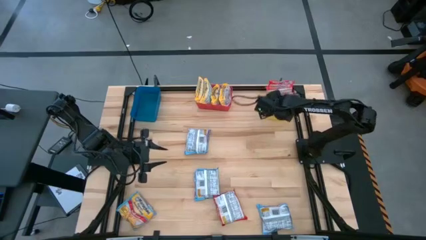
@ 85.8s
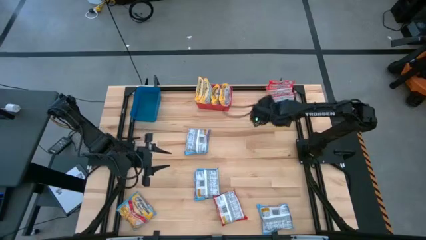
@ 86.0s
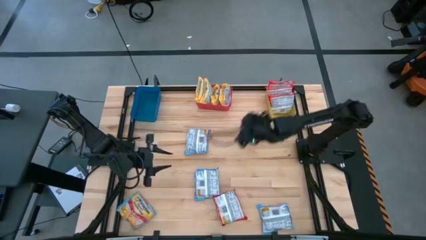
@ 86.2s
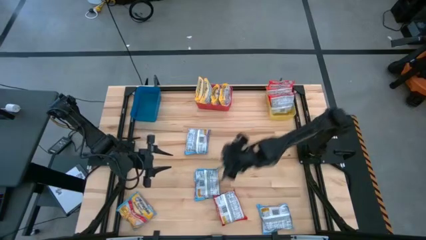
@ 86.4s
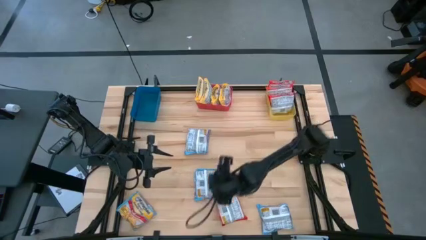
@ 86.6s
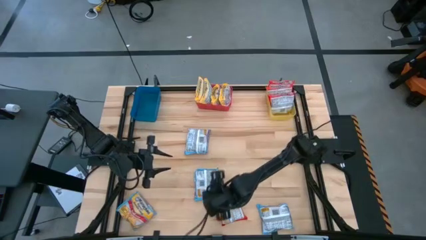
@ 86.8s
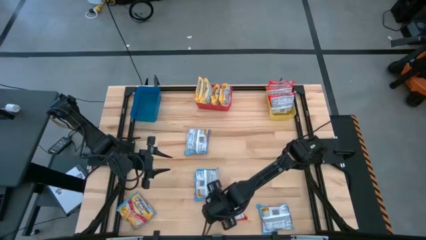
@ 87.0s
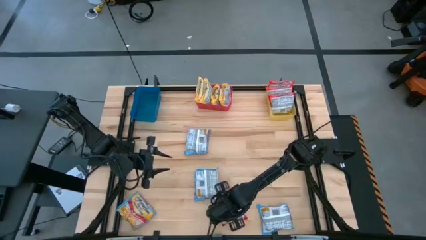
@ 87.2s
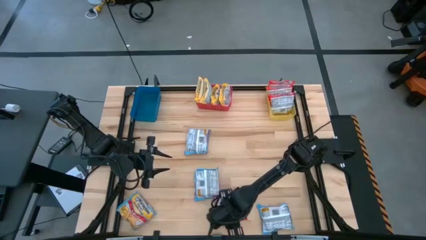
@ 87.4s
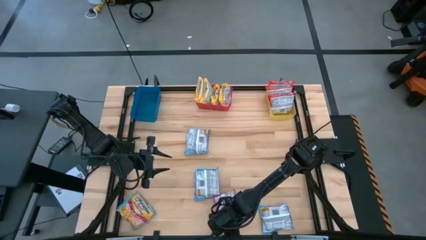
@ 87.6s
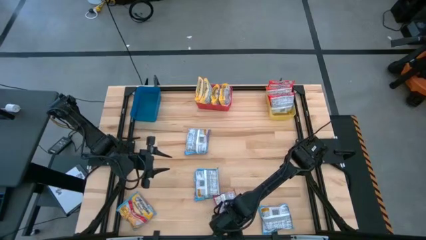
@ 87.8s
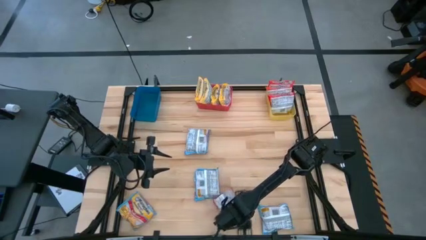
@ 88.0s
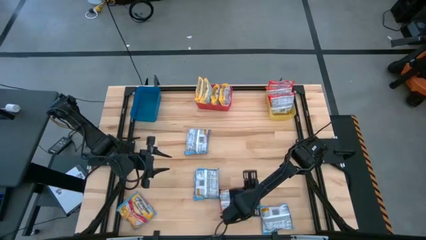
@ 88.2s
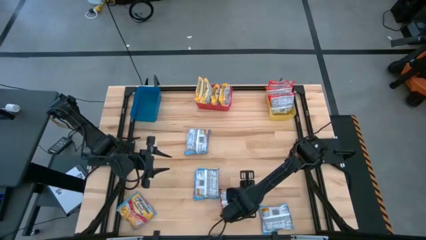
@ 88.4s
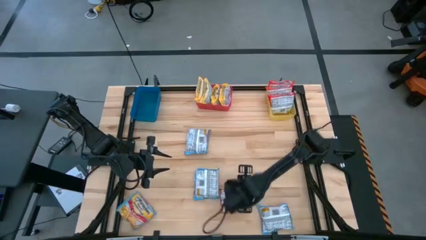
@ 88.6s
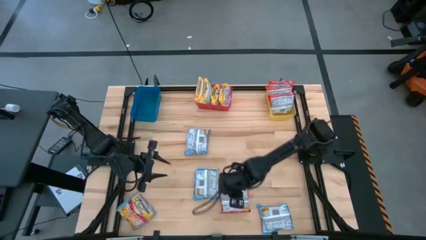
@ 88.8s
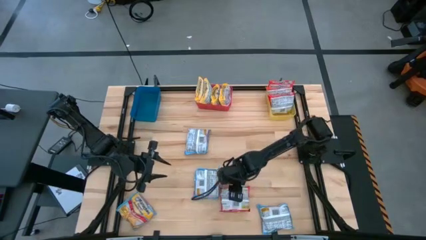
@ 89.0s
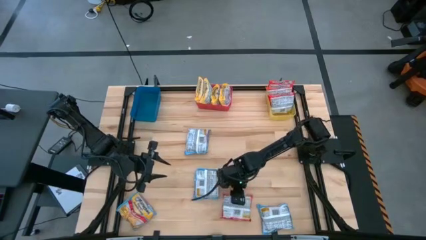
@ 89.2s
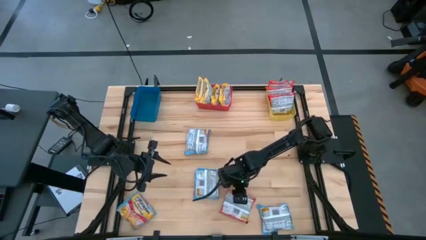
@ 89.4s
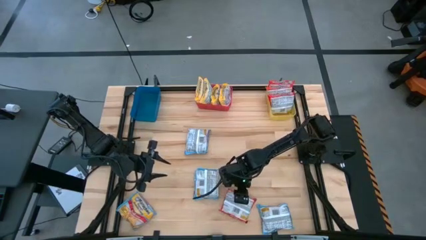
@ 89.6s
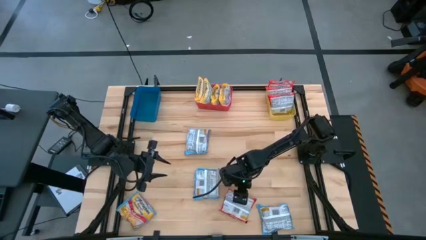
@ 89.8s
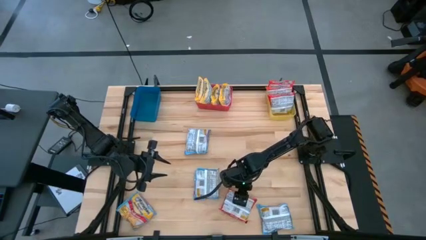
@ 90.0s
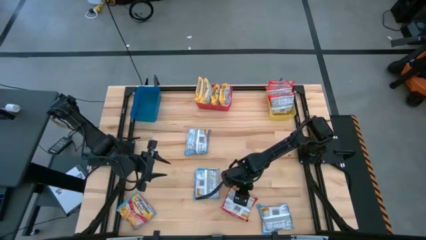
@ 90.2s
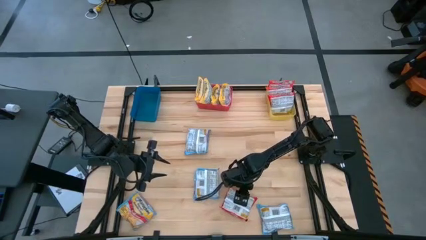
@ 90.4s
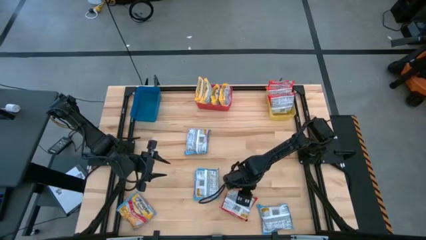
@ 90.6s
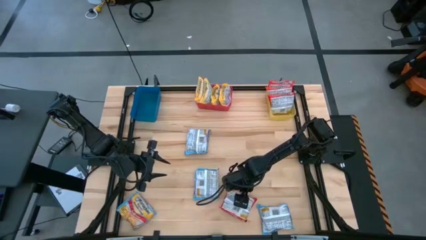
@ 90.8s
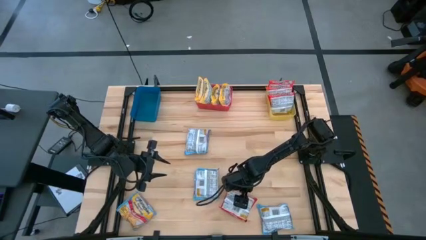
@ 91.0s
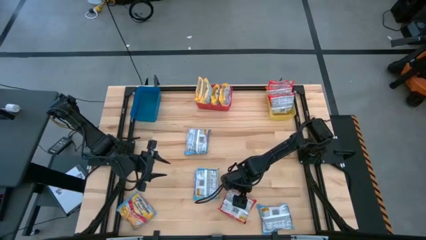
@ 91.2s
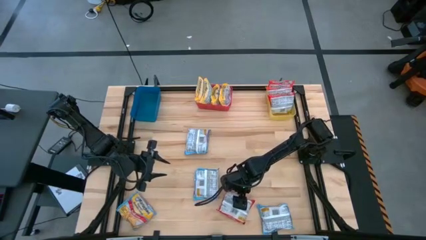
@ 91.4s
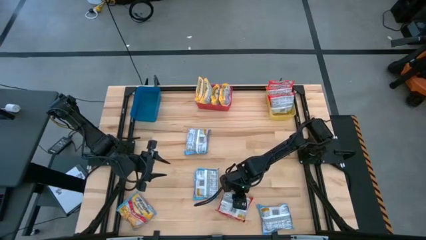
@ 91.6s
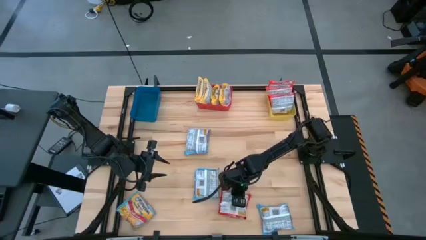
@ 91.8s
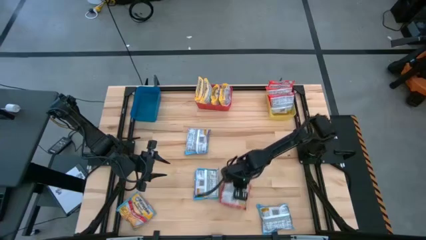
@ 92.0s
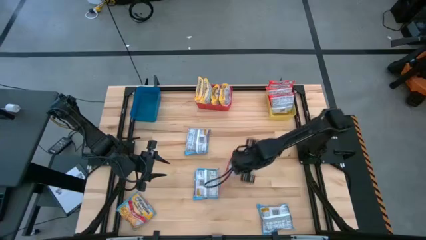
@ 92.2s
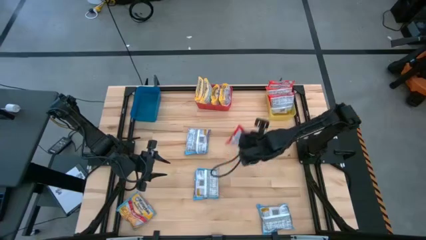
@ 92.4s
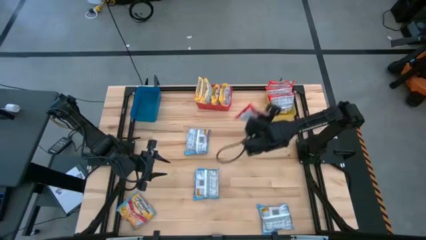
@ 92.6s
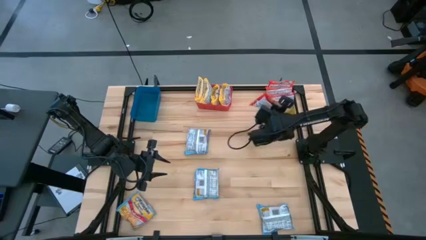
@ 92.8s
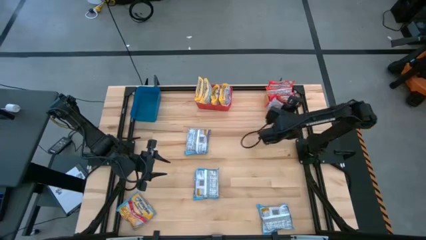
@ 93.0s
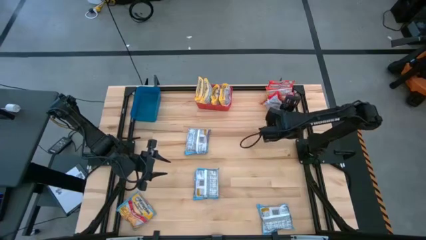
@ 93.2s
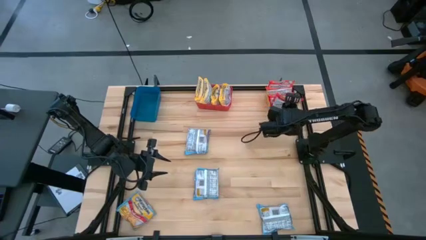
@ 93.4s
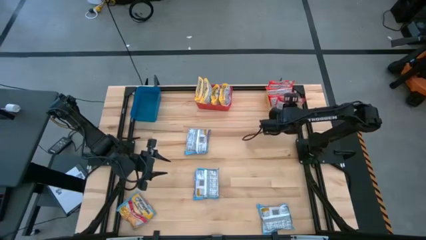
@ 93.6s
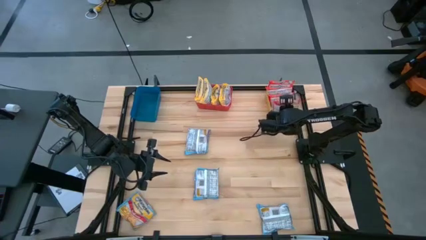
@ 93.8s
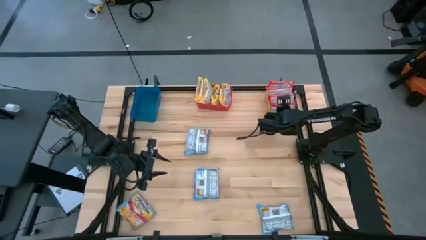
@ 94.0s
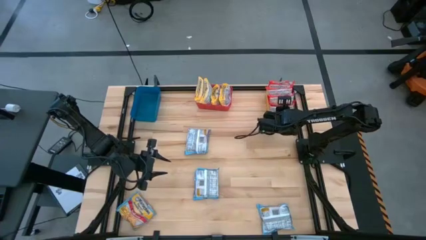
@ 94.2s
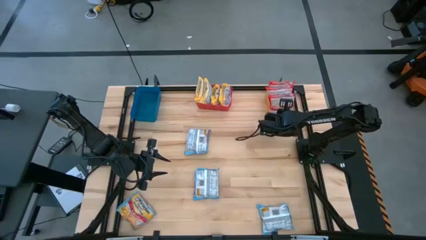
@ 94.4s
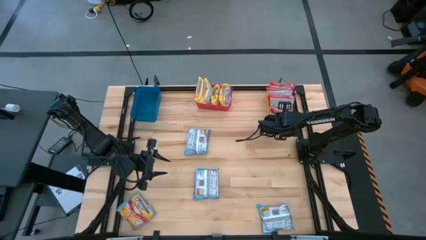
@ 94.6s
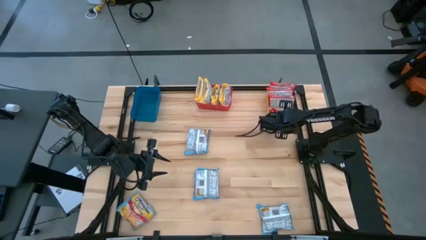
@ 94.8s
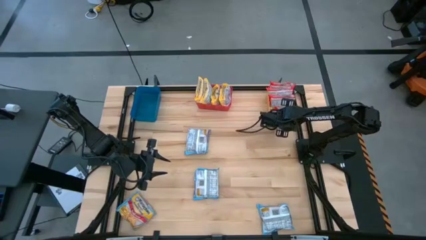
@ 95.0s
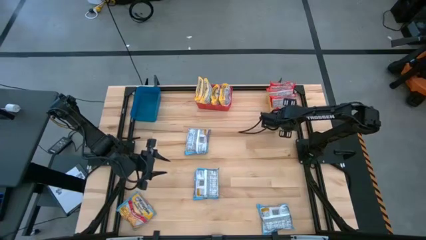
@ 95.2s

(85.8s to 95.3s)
Task: Sort Maruchan noodles
Put the red noodle pack into the yellow bin

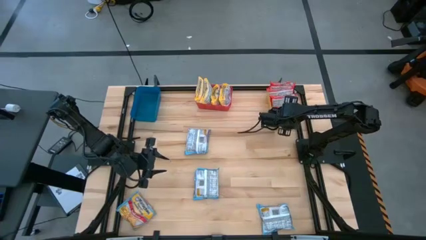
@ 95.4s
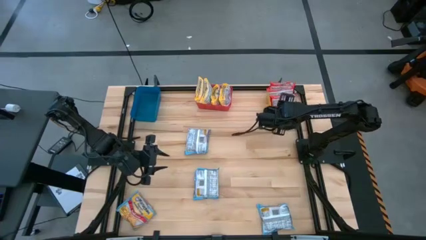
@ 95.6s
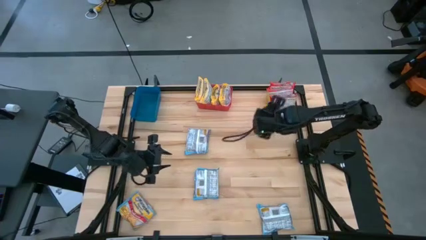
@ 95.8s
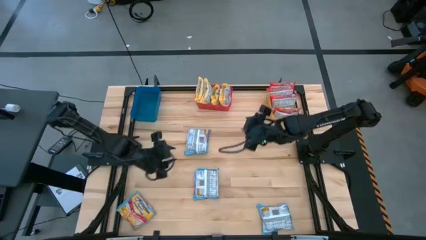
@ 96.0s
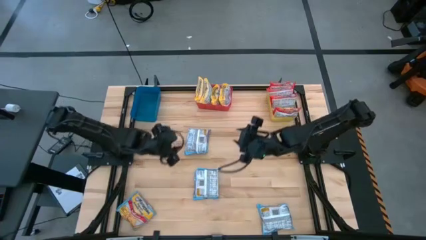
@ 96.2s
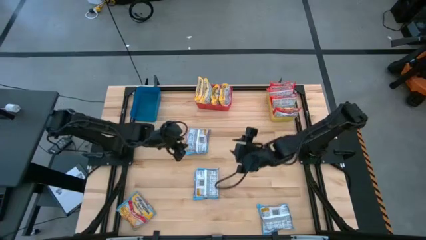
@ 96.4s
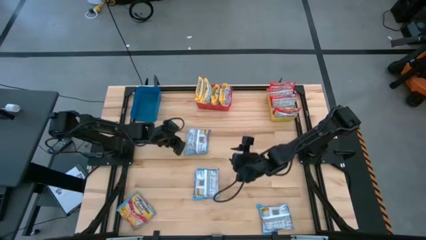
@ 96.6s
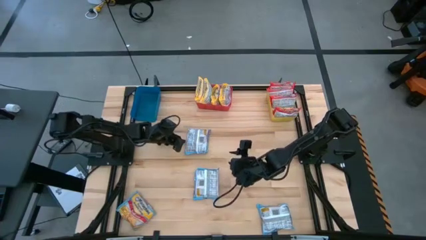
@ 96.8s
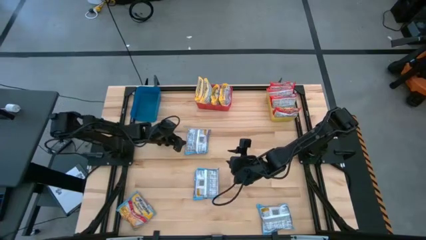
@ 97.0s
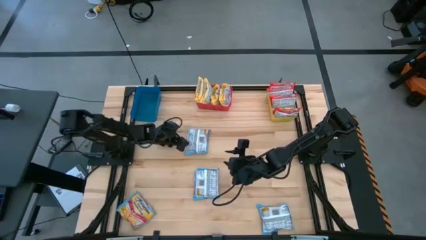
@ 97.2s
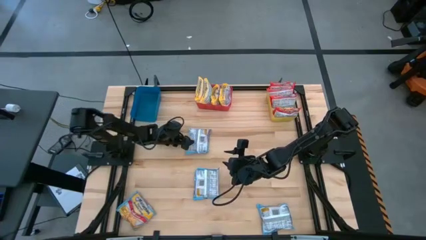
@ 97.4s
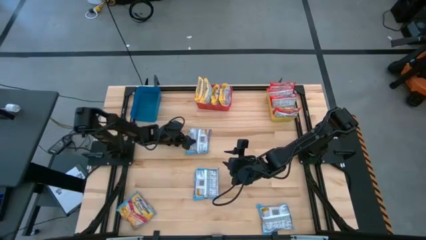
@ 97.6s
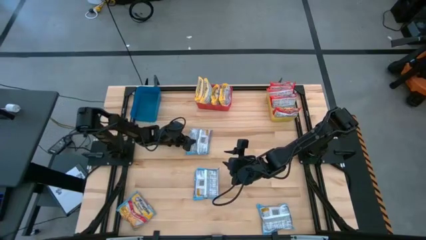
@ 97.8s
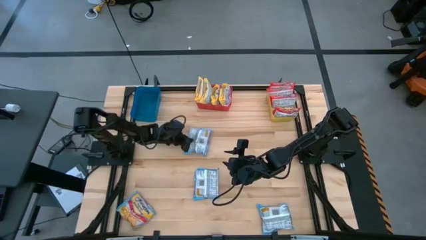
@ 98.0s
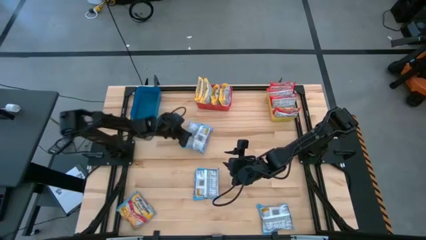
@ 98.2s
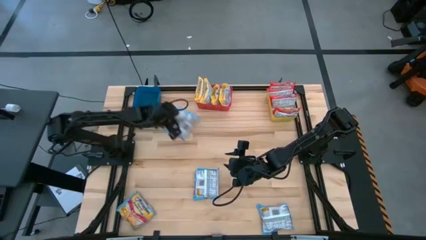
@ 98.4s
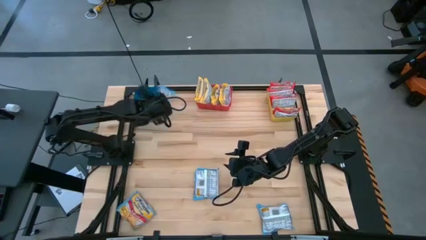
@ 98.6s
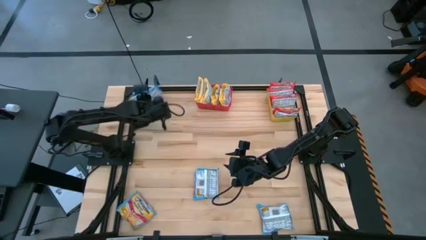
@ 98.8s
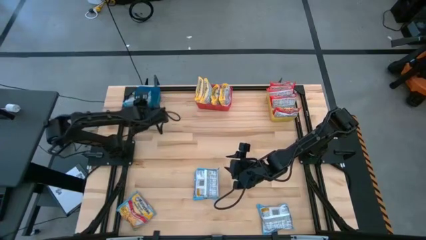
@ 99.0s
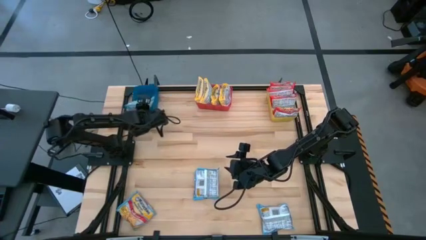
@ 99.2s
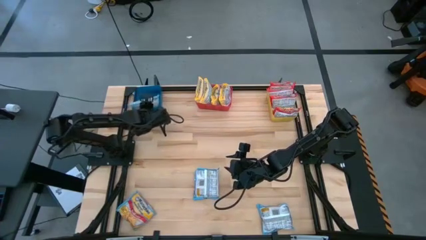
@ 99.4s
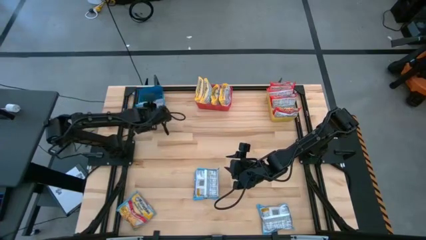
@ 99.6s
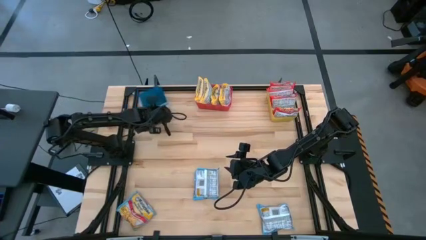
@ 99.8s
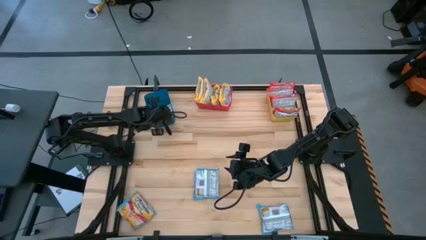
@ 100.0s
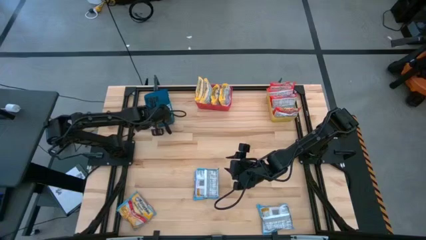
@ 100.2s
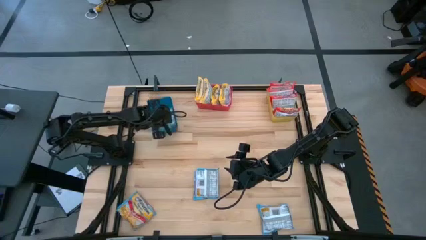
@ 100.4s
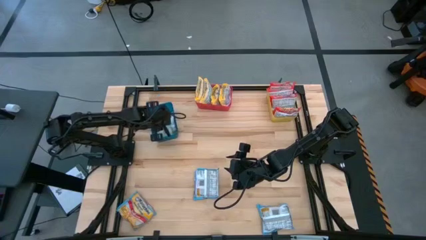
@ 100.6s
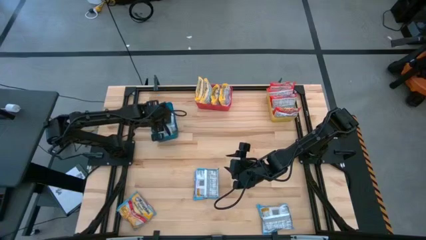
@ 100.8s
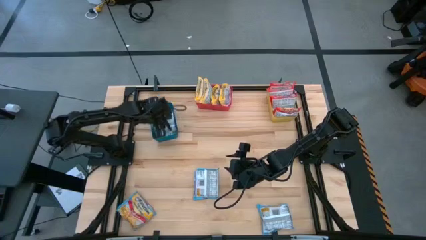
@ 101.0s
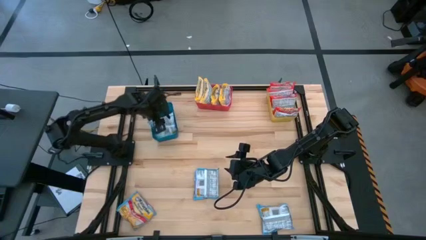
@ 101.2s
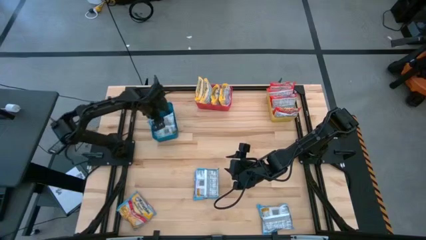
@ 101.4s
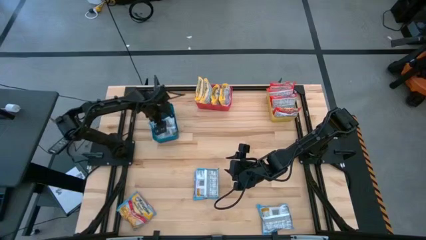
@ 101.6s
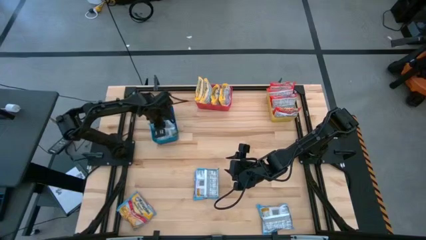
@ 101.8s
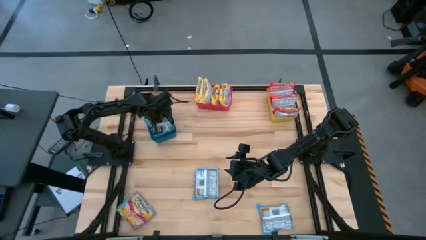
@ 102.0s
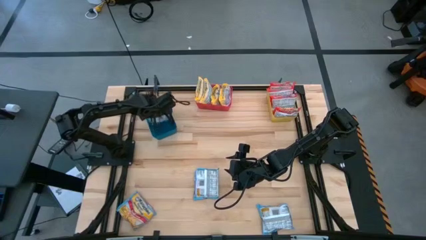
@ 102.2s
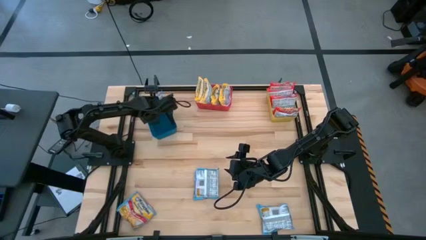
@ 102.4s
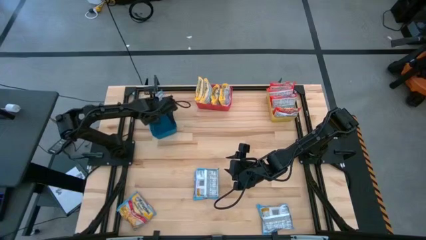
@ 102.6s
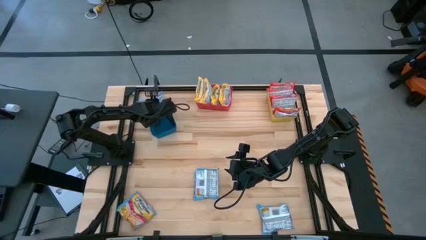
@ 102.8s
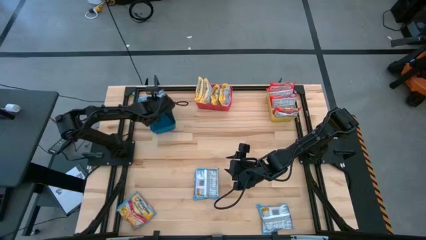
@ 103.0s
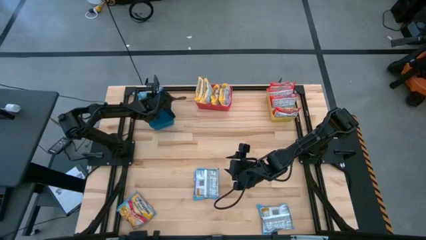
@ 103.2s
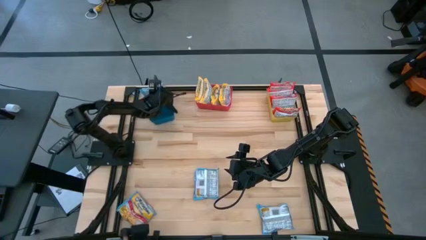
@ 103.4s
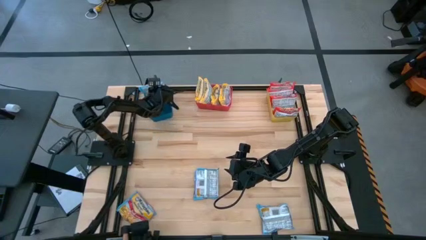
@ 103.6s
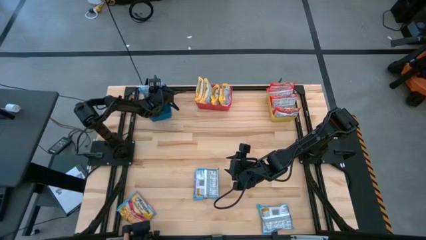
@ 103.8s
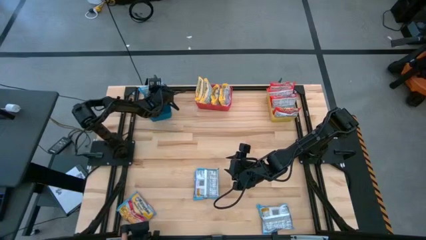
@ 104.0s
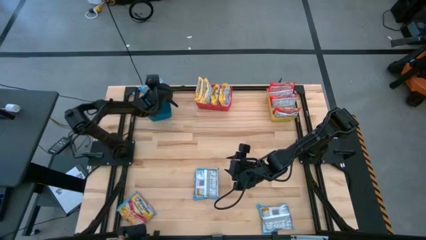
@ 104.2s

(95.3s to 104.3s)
Put the blue noodle pack into the blue bin
